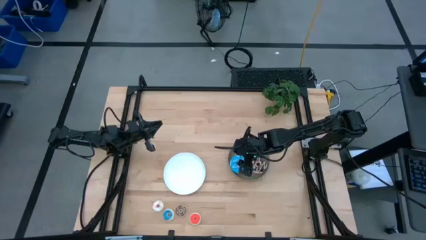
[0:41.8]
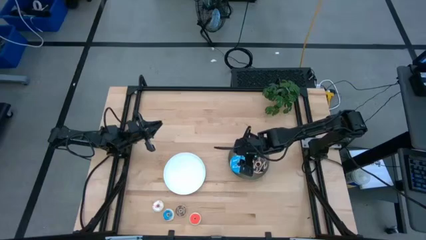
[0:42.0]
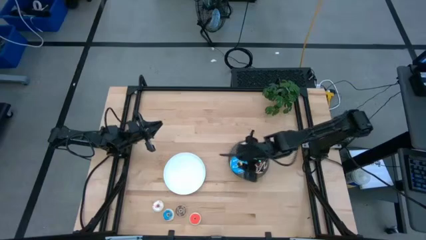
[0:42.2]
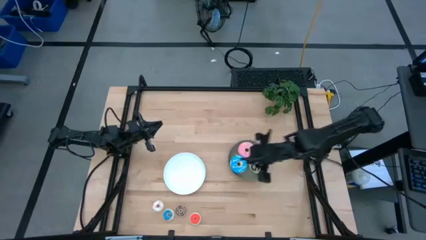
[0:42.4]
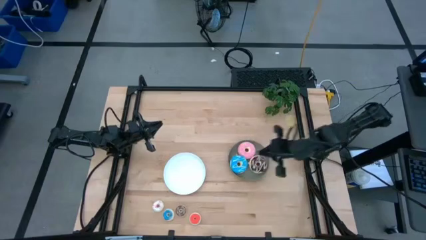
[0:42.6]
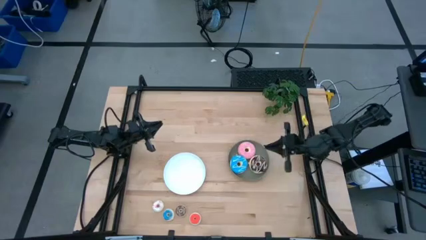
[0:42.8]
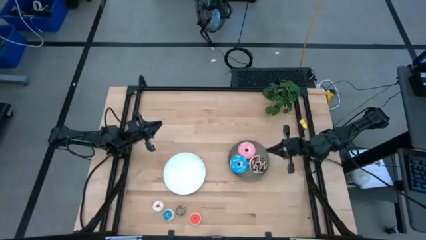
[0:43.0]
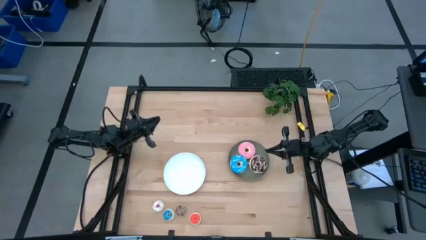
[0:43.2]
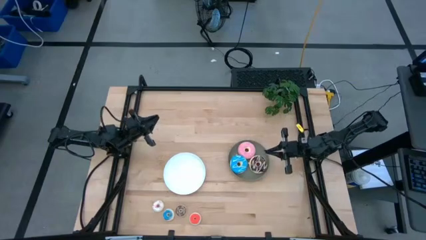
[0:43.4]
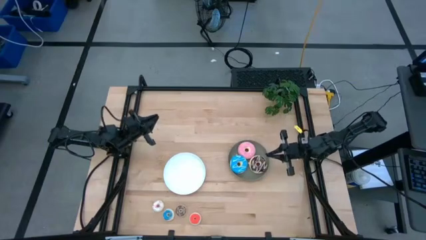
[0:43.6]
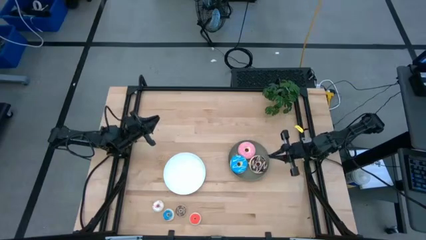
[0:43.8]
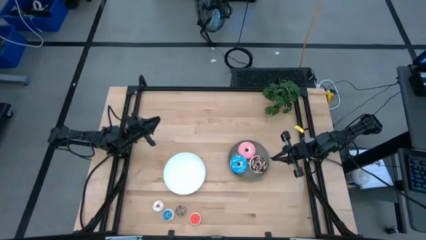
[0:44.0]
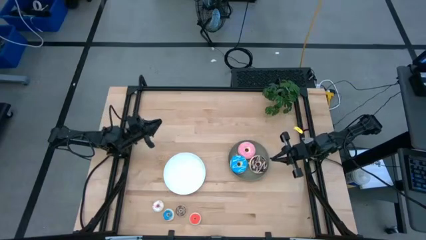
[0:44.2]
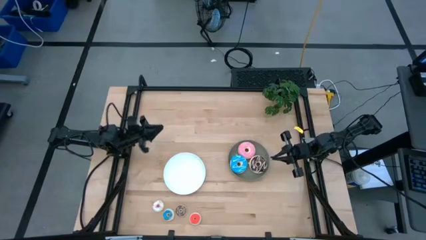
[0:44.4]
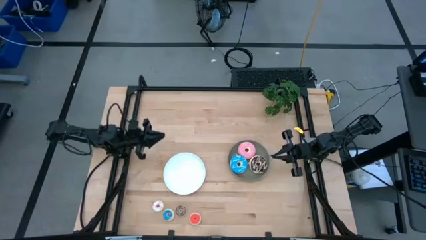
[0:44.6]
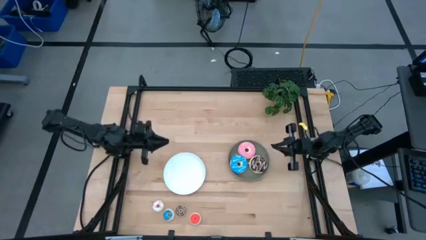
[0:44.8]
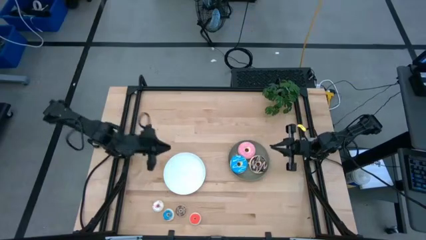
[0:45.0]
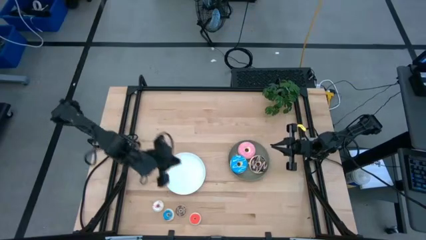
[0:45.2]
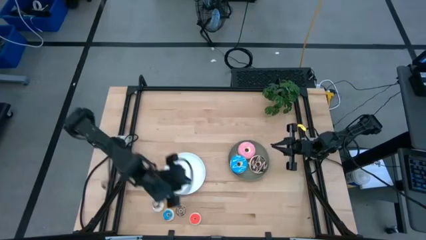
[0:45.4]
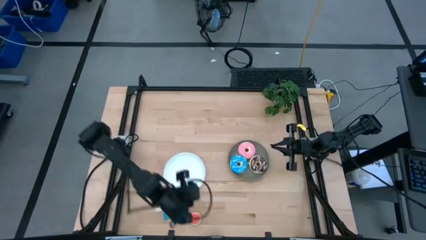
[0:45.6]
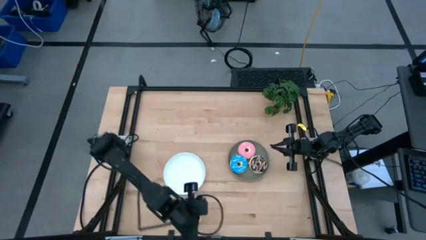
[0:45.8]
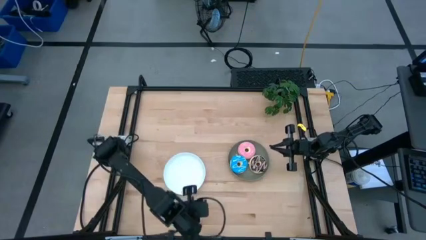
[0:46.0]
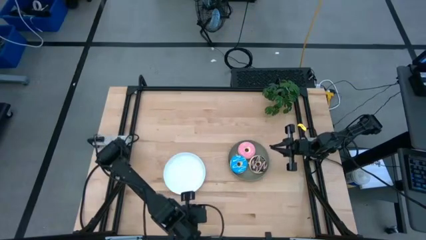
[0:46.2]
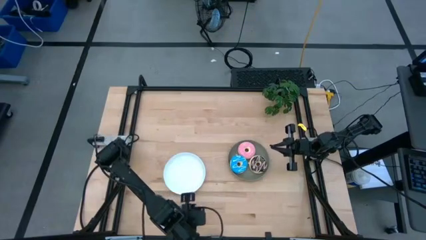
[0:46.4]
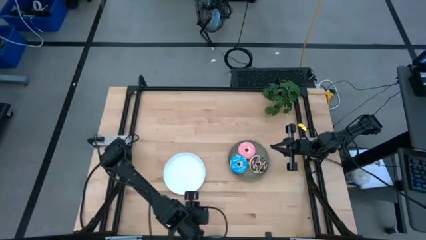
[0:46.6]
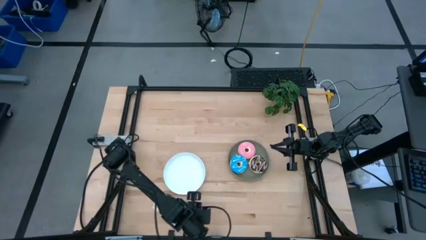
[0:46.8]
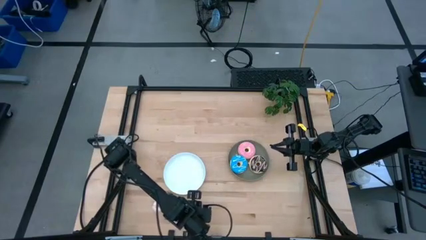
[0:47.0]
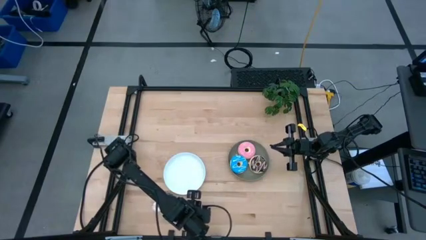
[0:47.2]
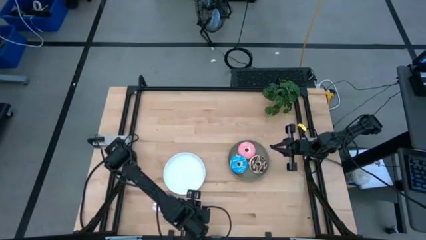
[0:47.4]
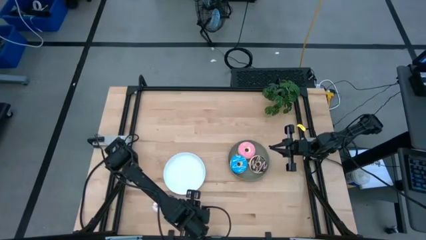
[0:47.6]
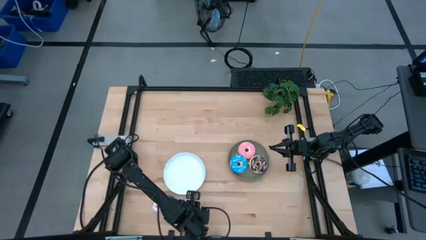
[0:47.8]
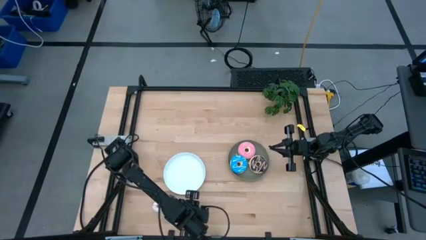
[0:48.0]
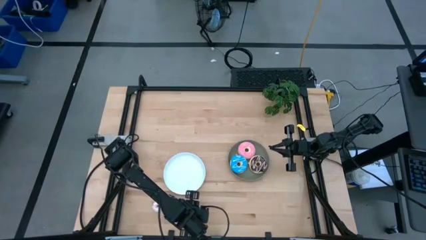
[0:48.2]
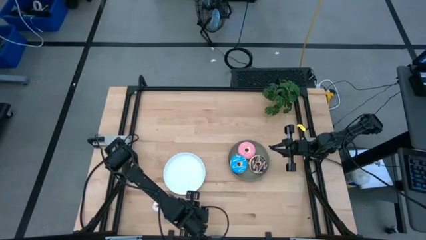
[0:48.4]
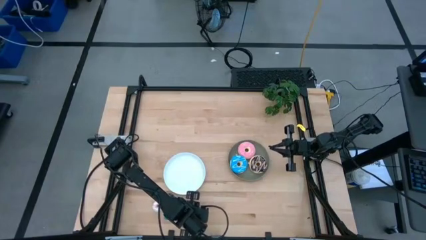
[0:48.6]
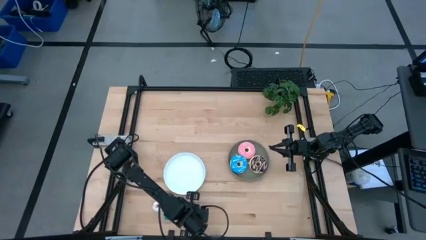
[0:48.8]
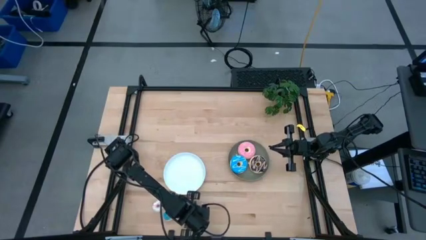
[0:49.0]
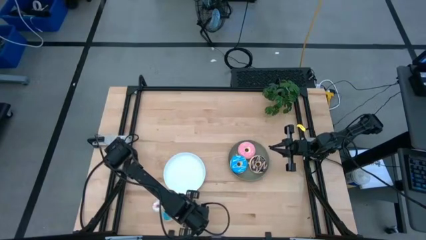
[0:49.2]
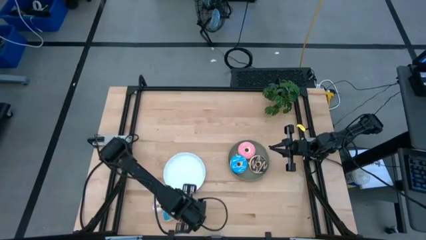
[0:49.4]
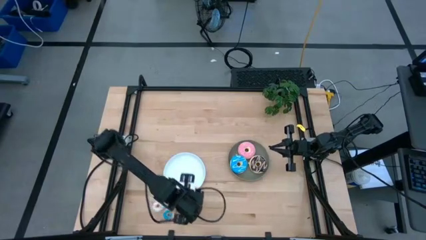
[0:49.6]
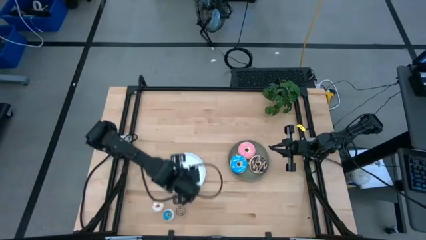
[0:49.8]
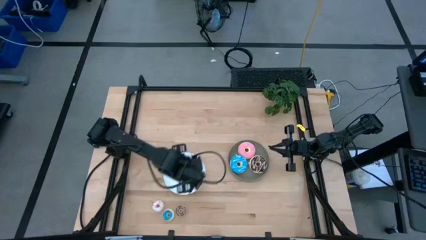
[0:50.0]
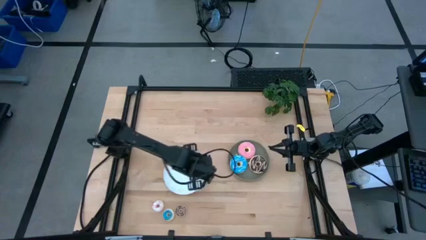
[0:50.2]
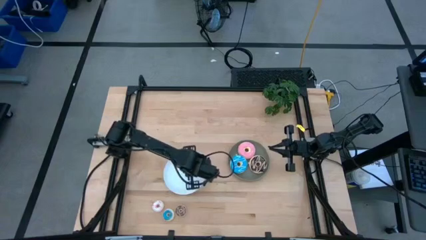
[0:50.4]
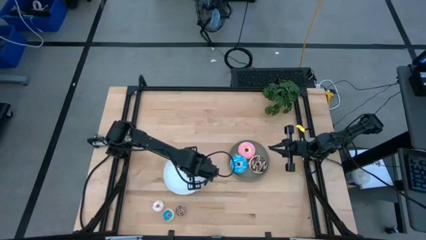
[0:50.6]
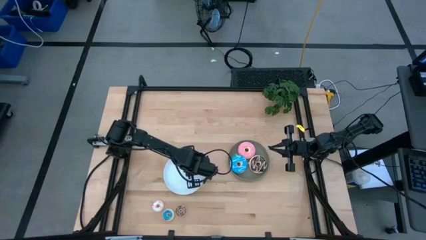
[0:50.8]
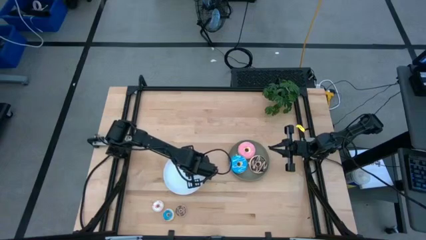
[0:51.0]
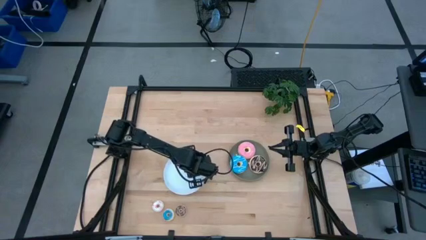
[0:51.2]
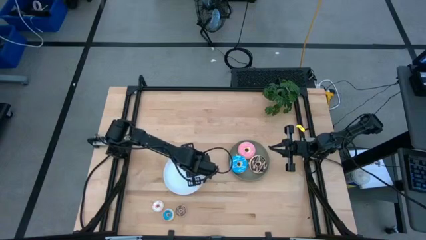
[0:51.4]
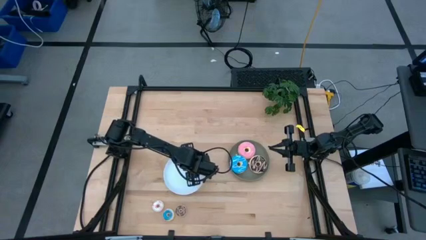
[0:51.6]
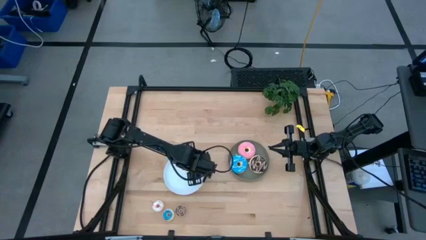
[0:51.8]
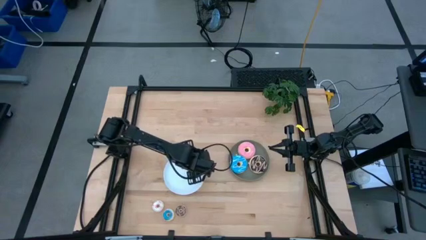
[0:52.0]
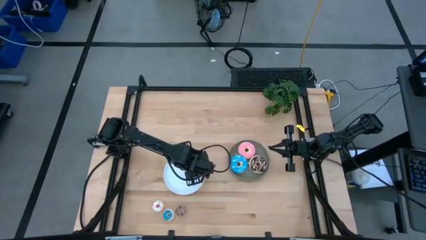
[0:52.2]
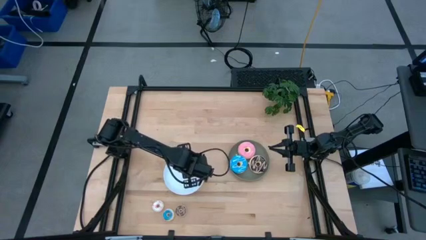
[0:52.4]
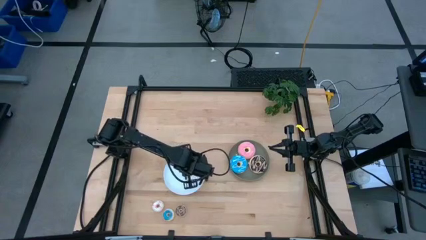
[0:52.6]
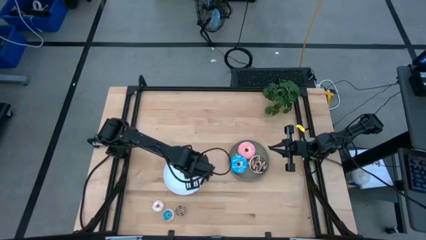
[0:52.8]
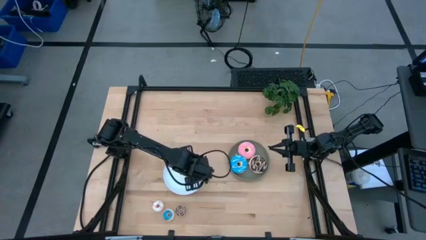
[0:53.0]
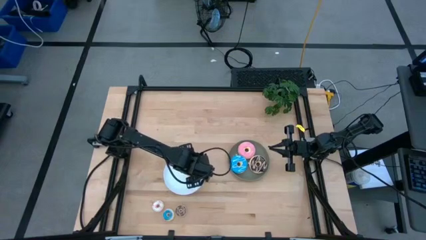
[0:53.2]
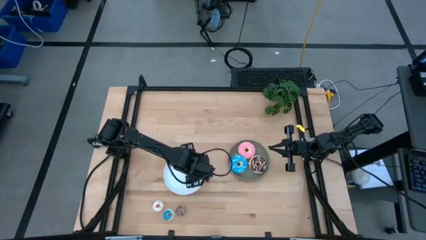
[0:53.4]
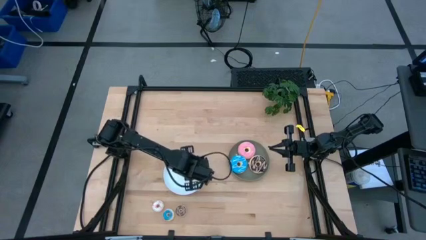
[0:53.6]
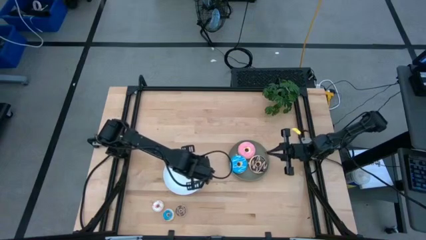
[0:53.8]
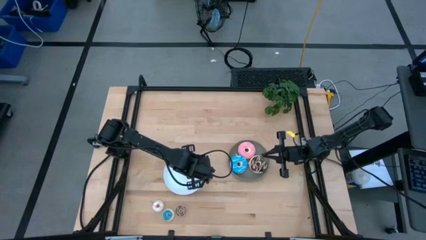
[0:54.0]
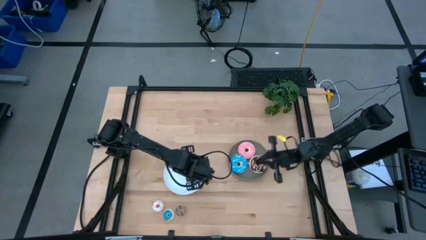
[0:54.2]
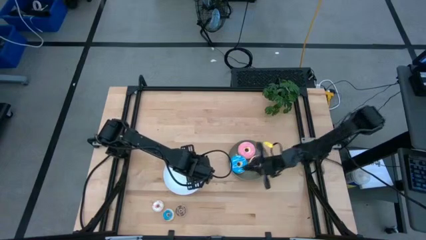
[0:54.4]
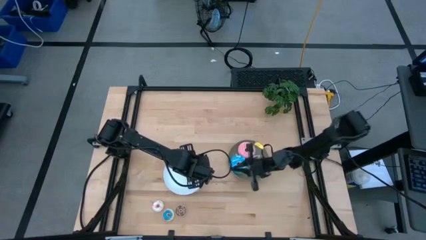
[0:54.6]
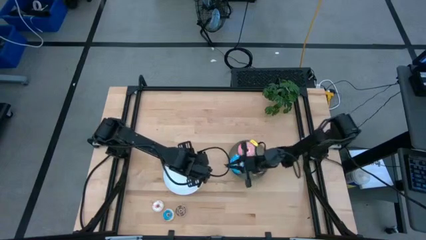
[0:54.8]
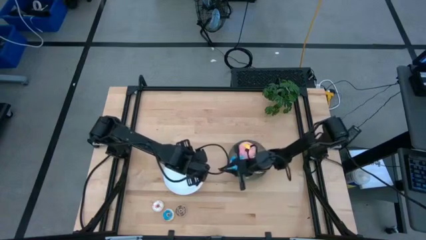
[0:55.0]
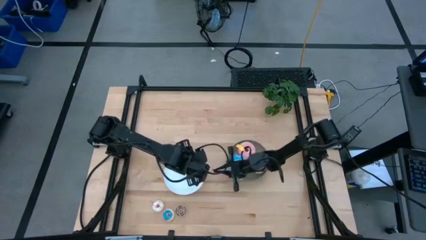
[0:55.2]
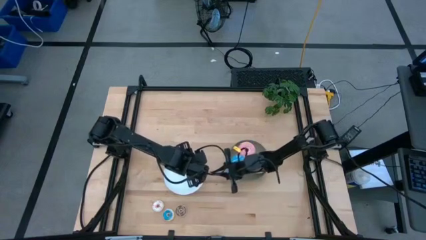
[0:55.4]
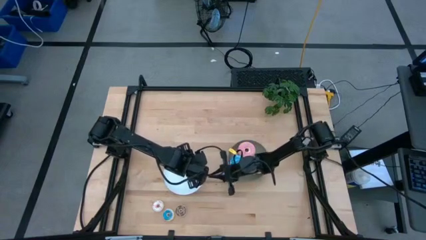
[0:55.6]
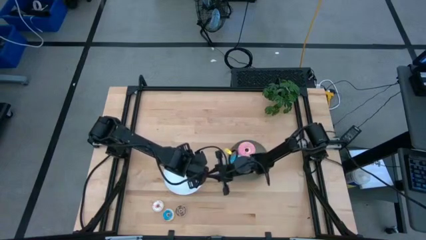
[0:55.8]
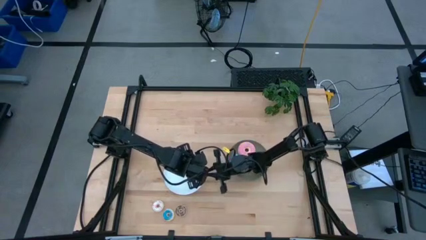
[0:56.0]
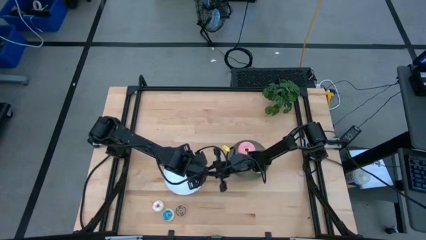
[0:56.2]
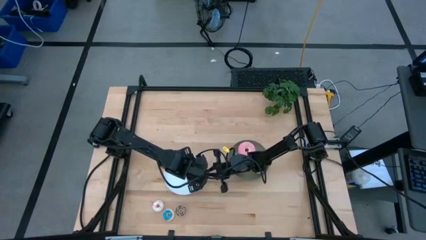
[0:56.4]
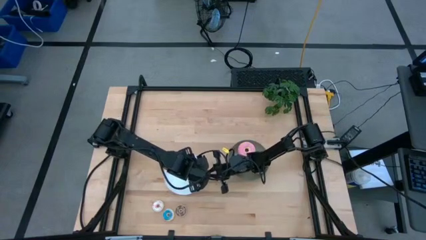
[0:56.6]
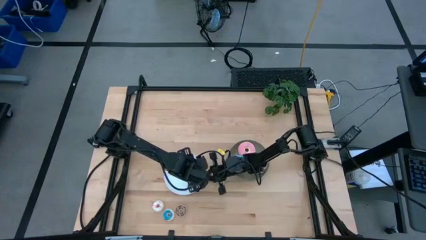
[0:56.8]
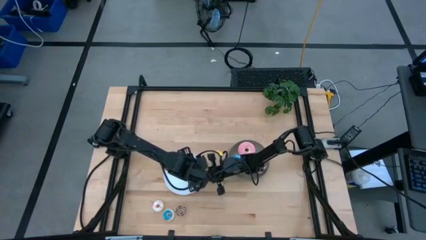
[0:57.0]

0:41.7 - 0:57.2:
Task: Pick & Place donuts
Put the small red donut on the white plate
